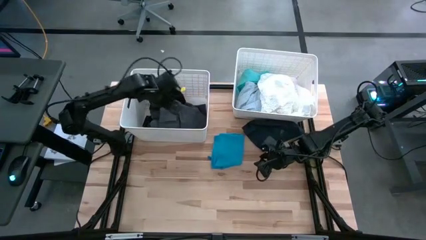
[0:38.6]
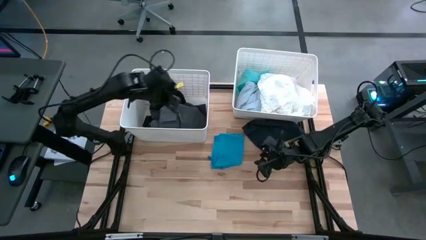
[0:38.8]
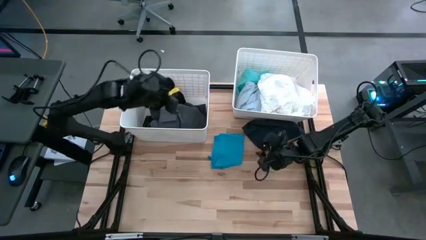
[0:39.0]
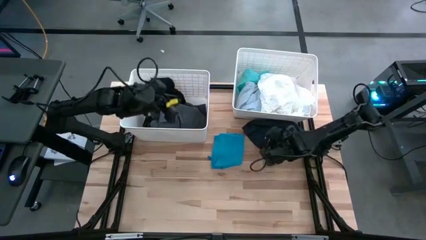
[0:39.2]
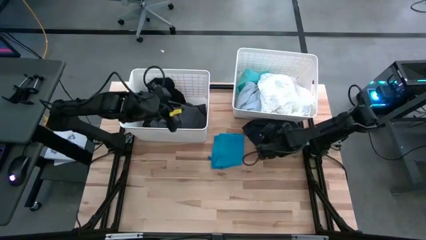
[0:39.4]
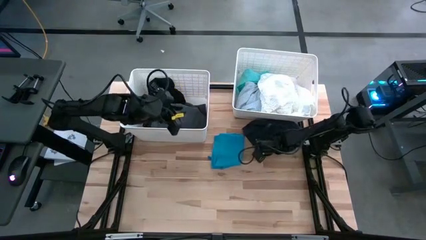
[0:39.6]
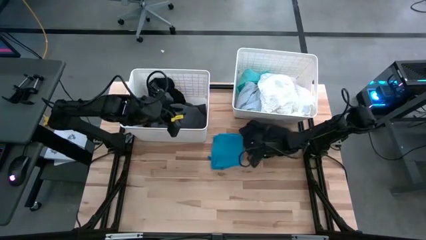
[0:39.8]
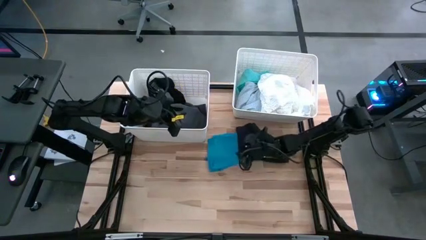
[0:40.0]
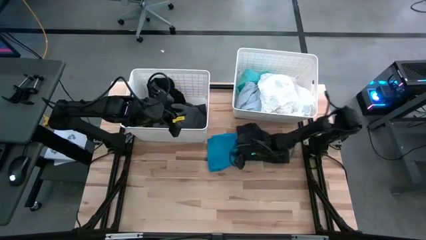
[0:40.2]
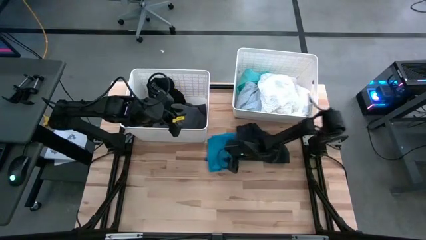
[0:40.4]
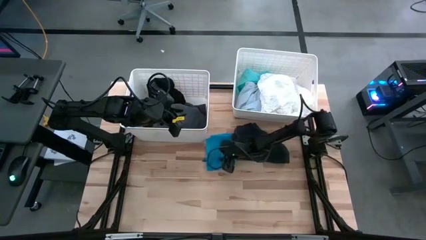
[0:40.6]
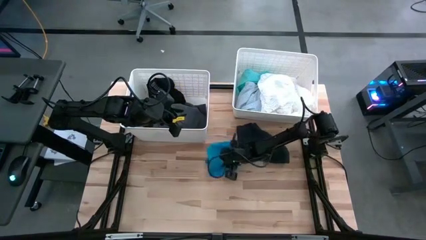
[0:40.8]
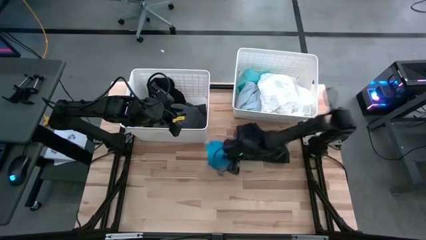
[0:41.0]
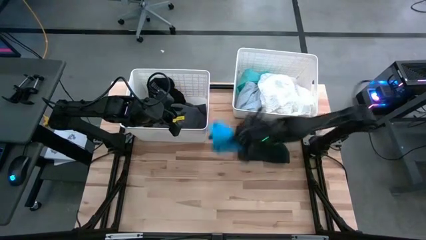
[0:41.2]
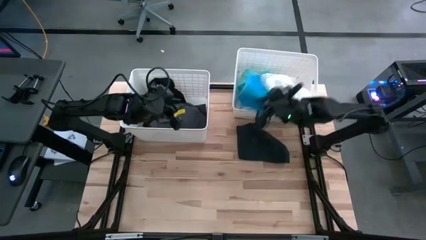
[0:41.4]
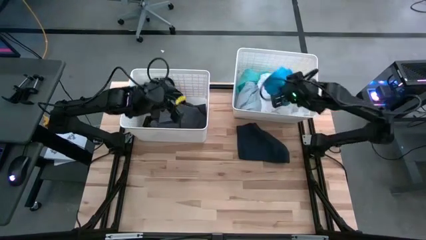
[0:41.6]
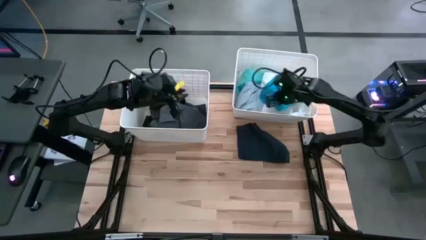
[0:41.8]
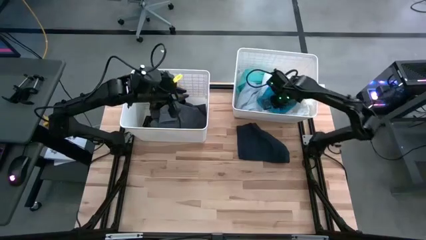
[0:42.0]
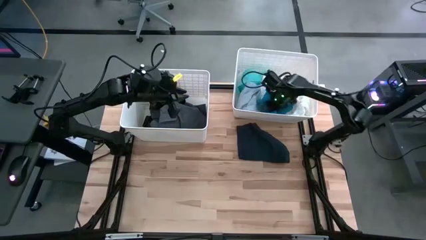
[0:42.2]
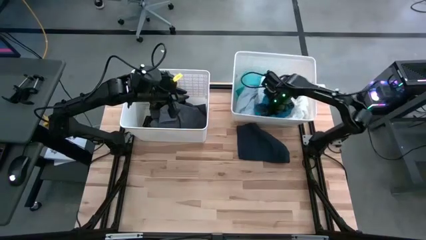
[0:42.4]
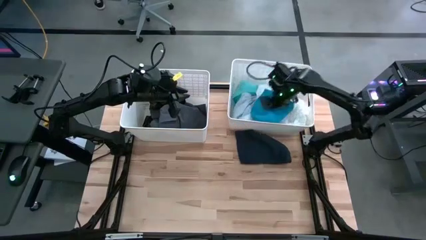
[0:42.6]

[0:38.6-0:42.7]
Task: Sort clothes
Put the blue short into the right laundry bin

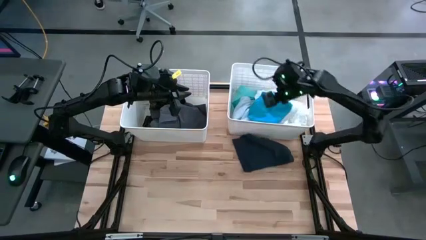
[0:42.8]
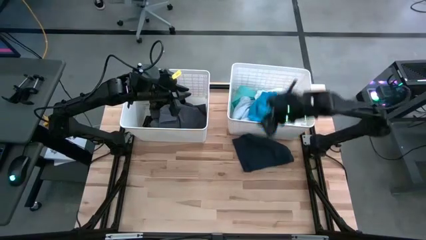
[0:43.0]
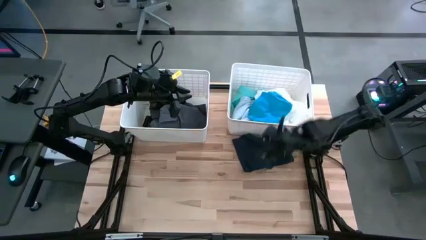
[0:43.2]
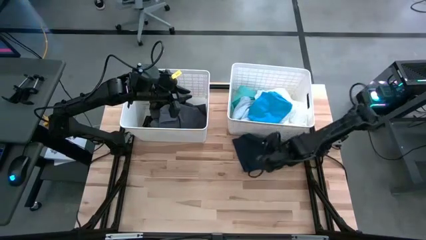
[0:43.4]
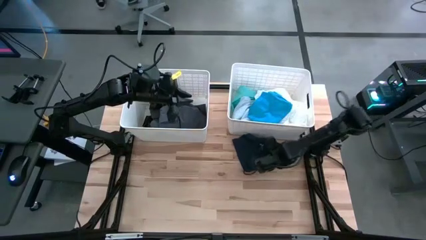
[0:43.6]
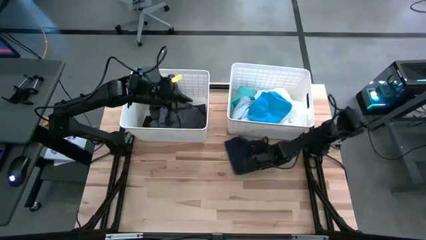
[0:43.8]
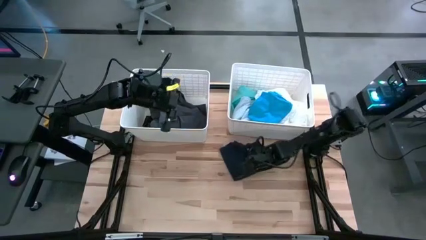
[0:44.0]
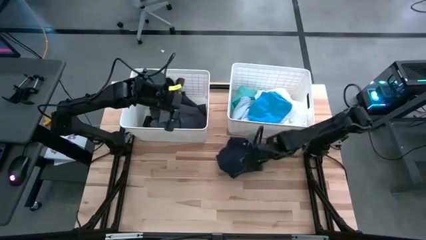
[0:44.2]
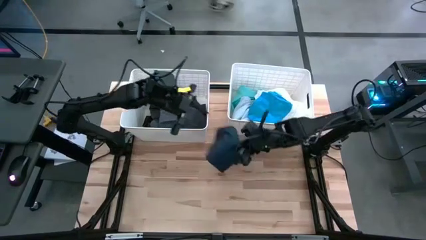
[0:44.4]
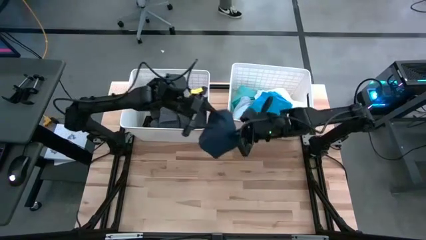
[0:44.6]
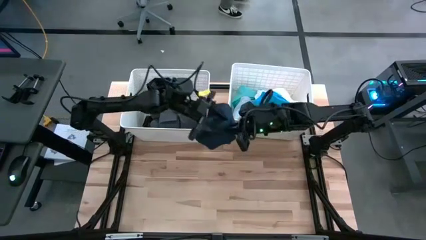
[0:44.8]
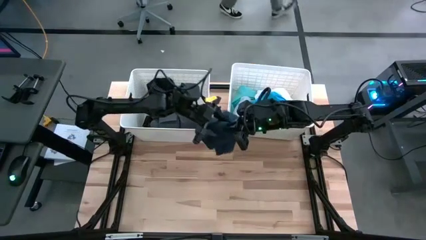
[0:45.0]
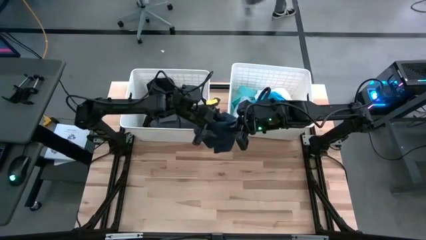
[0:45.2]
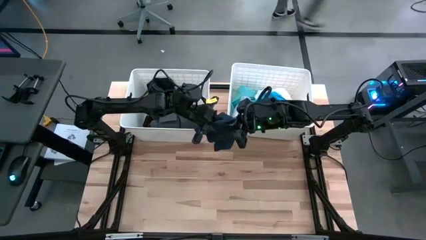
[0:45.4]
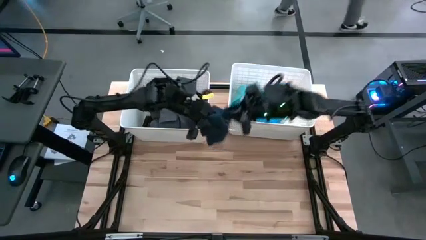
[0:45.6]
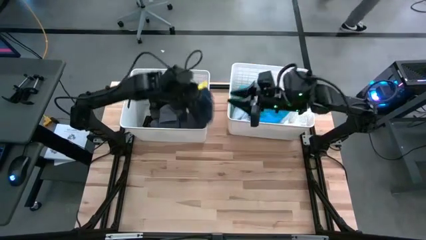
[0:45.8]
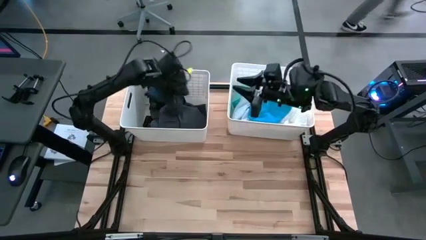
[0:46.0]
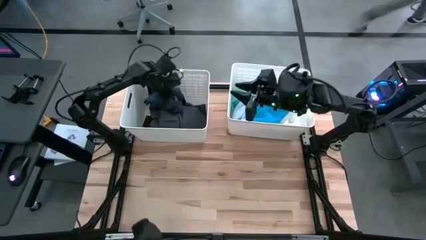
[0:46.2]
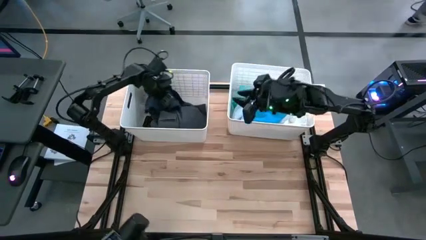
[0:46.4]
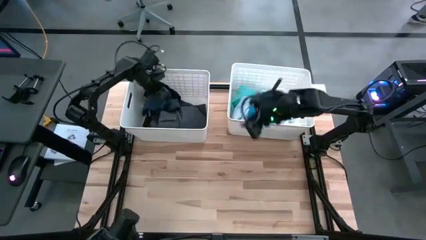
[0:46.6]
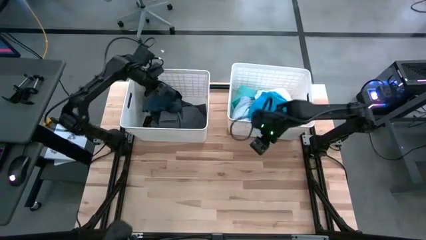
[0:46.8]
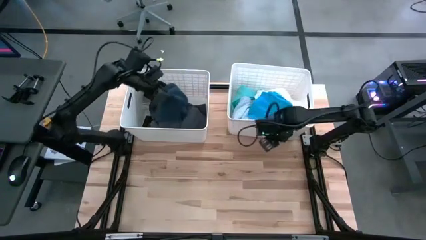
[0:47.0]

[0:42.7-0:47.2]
Put the gray boxer into the left laundry bin

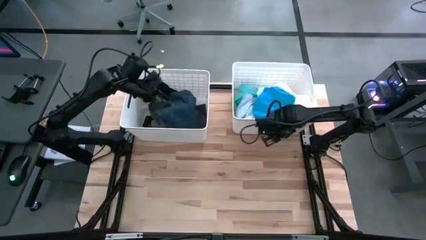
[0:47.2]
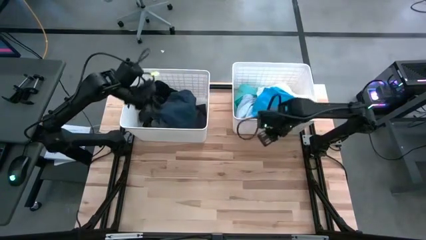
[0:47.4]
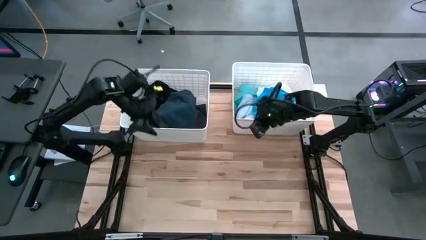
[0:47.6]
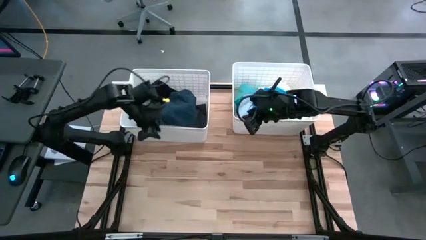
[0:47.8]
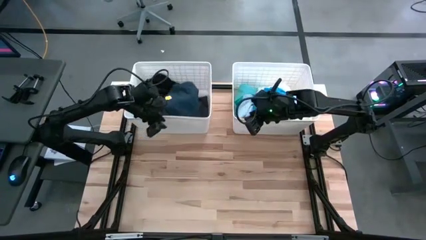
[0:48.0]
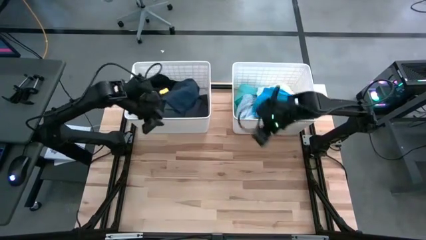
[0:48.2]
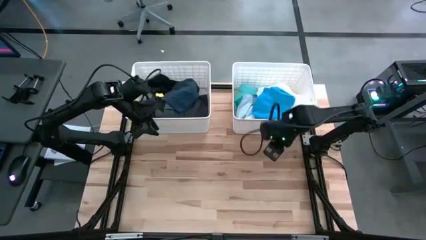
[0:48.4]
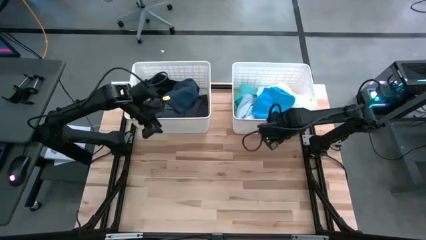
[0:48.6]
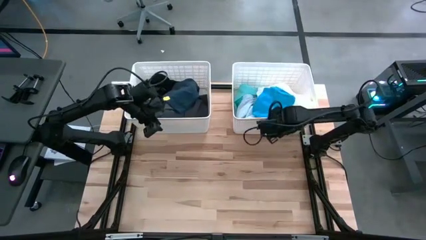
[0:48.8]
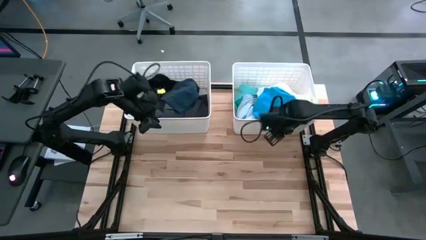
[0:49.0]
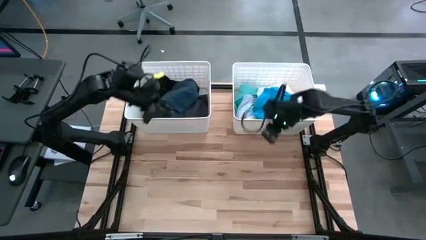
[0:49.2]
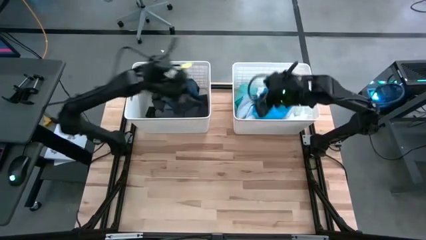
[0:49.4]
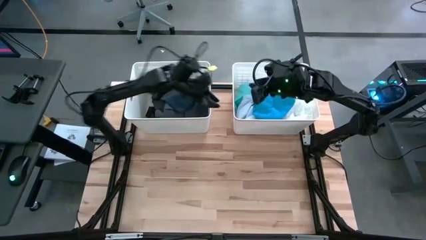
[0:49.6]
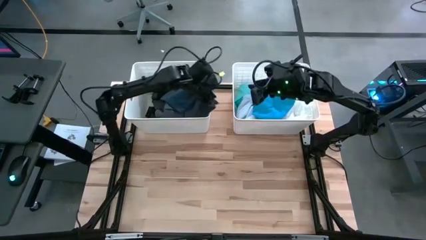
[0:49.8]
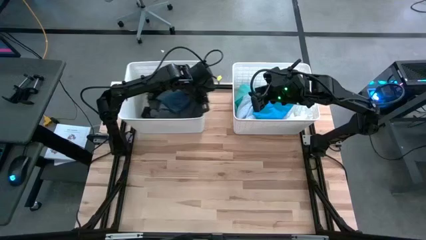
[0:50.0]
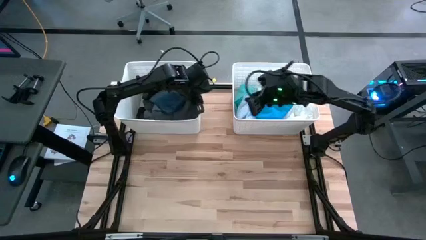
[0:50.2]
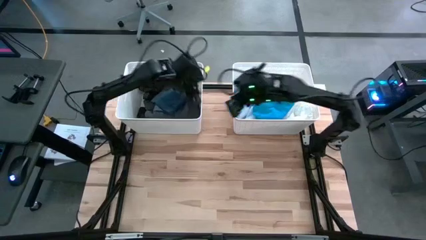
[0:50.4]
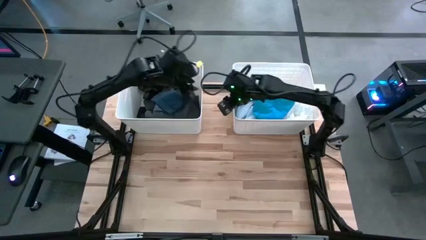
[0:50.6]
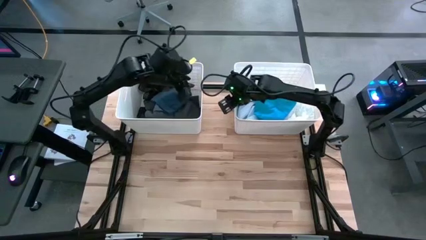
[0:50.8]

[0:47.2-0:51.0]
Adjust the laundry bins

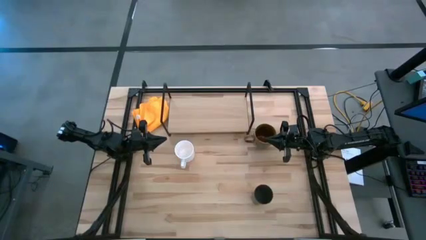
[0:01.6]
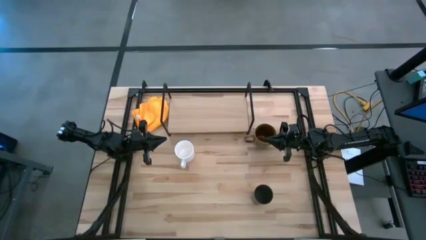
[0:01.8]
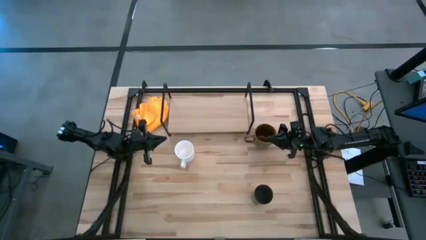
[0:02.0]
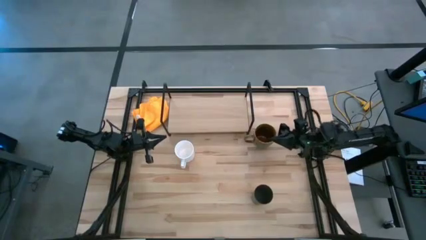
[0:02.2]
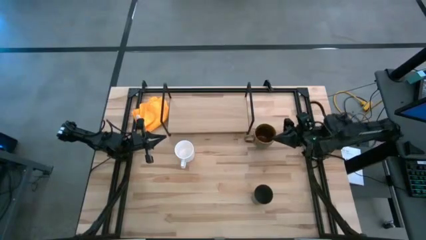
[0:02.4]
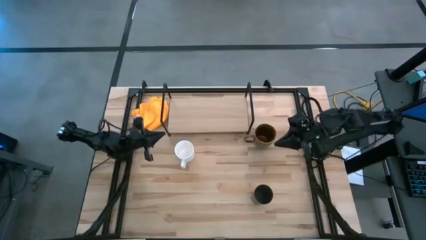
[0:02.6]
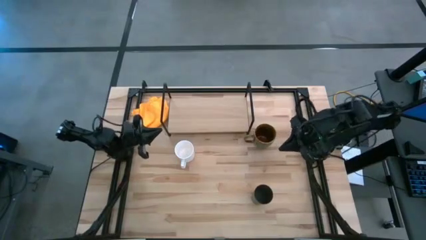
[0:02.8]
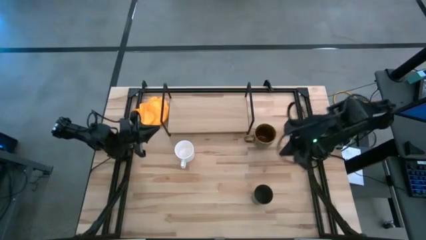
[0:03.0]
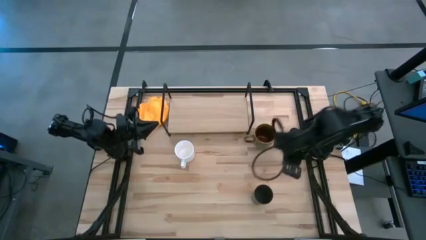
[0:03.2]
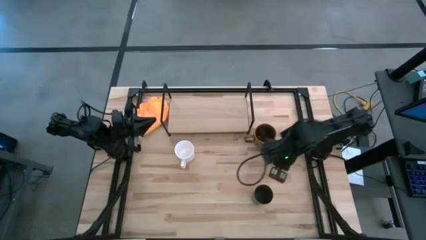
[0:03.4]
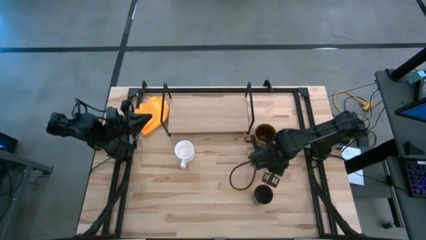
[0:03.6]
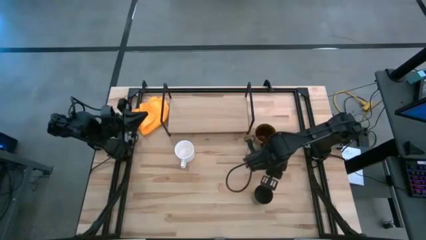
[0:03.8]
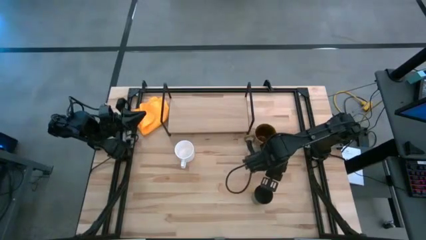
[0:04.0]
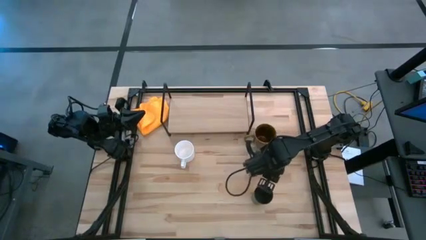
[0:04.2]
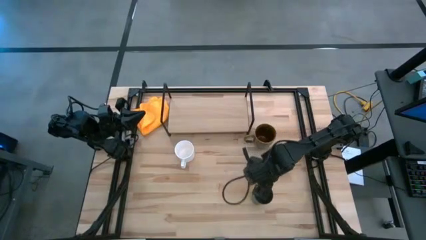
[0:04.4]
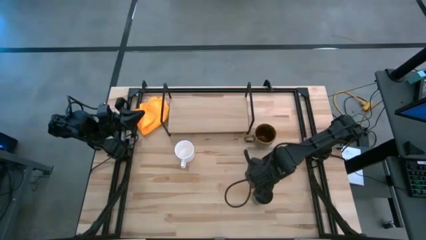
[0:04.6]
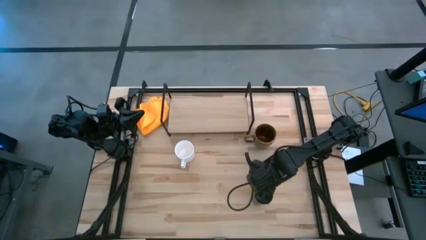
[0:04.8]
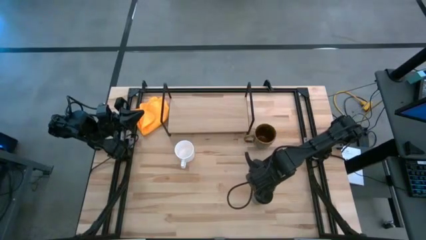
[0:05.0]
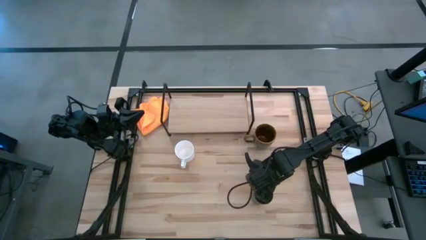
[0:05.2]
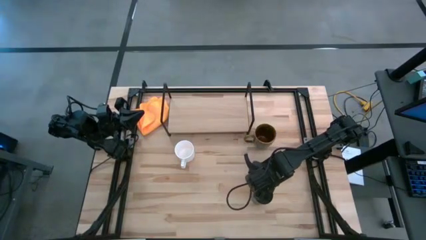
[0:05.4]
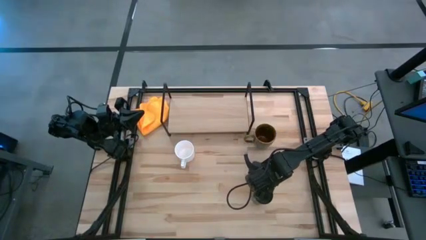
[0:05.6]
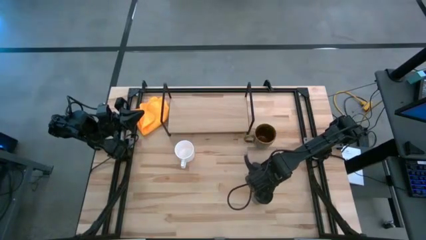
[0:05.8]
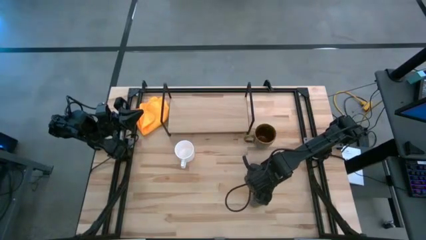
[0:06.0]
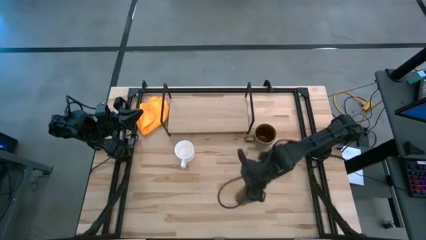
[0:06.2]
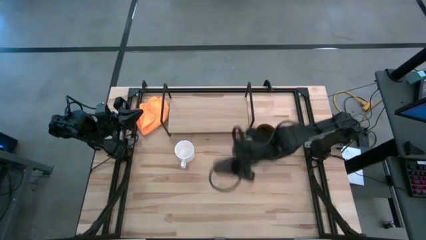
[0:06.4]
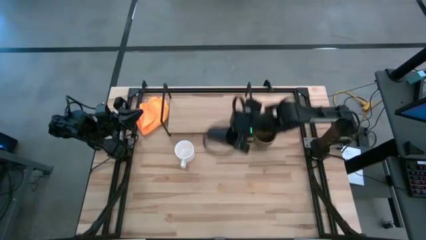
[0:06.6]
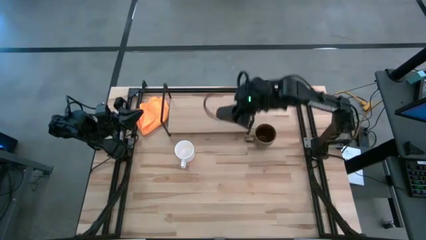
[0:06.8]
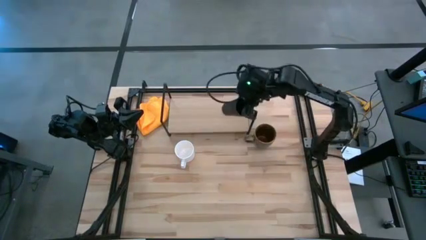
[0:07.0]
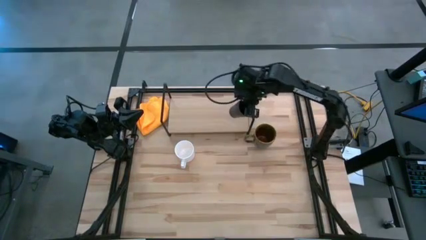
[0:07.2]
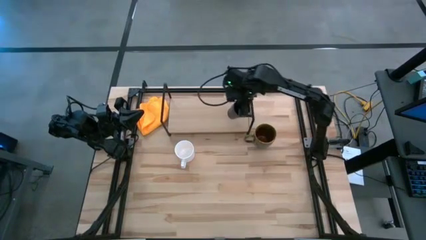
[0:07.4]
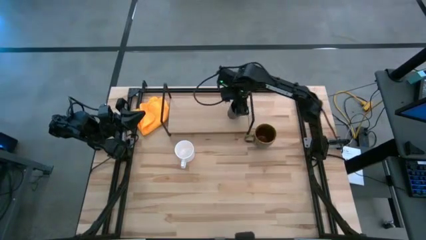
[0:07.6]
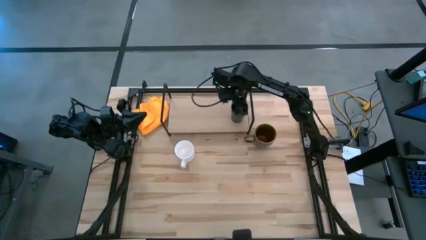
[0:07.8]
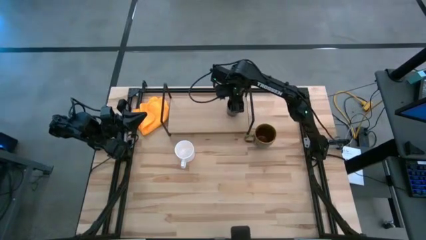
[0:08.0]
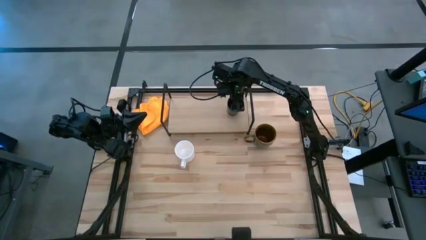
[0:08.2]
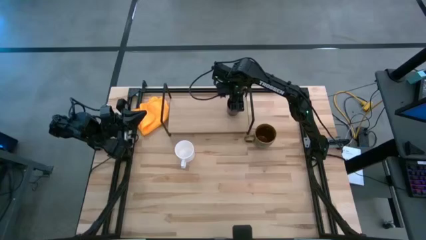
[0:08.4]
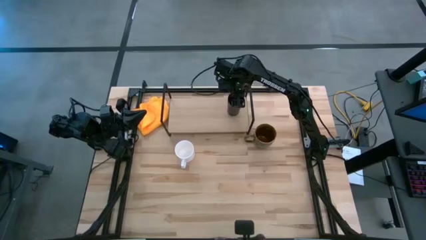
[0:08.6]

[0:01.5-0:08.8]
Task: Stack small to large cups/mugs on shelf
Put the black cup on the shelf
